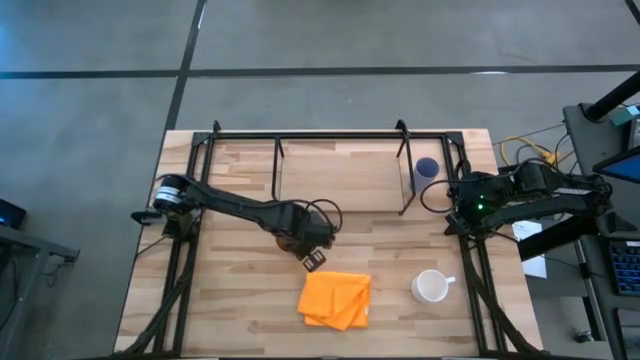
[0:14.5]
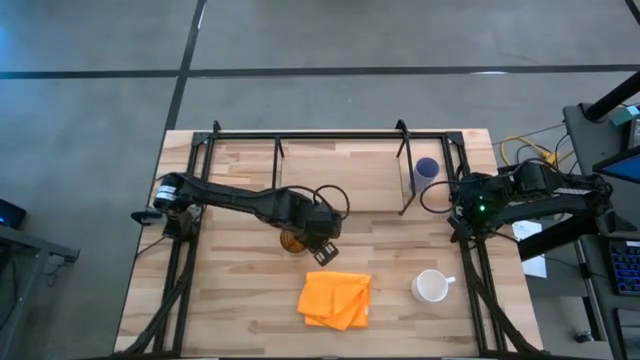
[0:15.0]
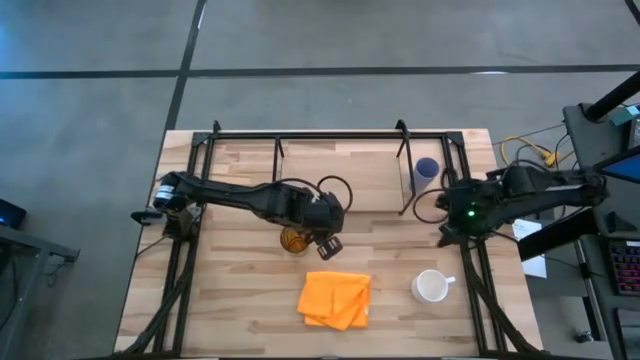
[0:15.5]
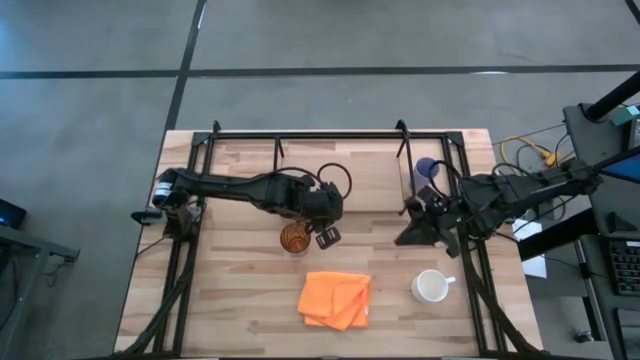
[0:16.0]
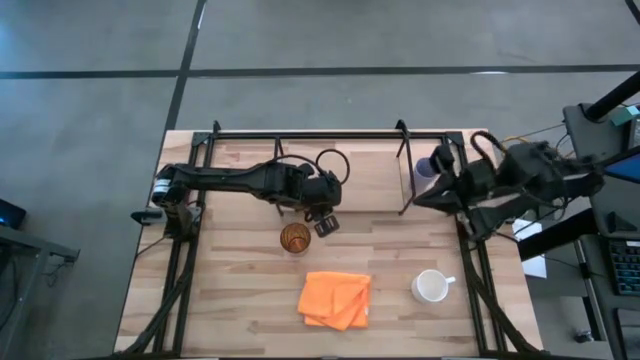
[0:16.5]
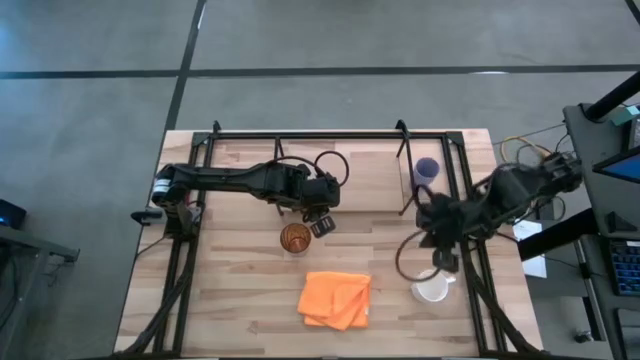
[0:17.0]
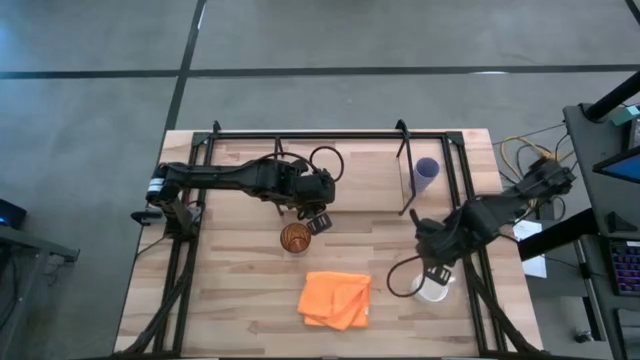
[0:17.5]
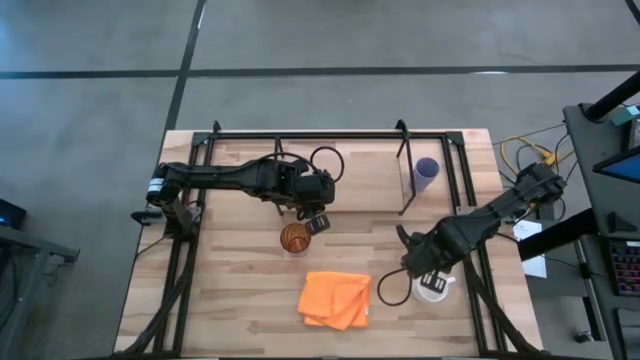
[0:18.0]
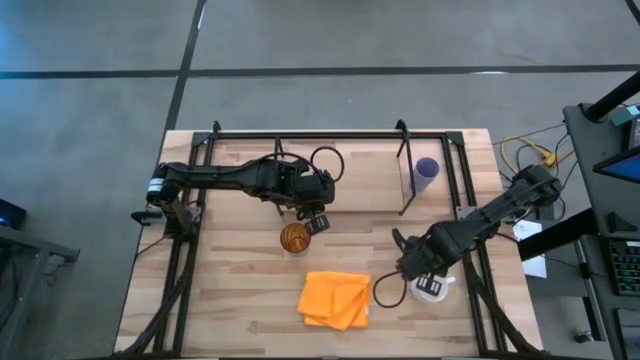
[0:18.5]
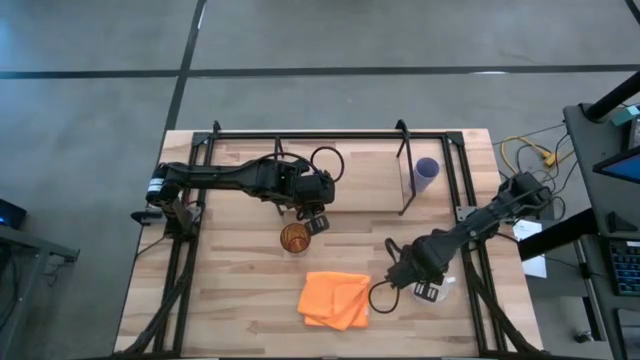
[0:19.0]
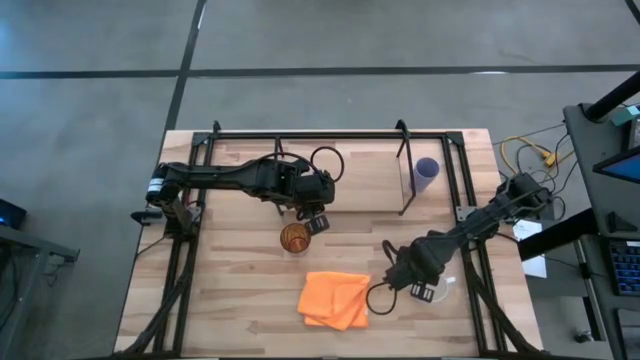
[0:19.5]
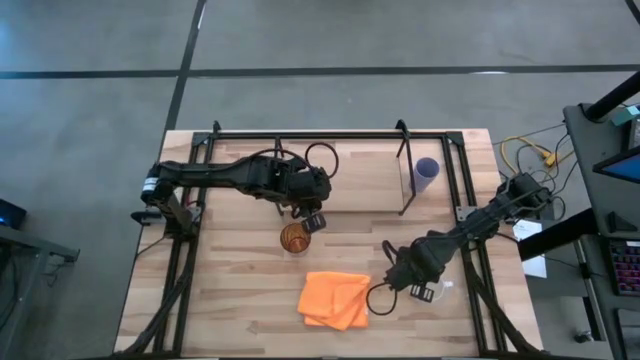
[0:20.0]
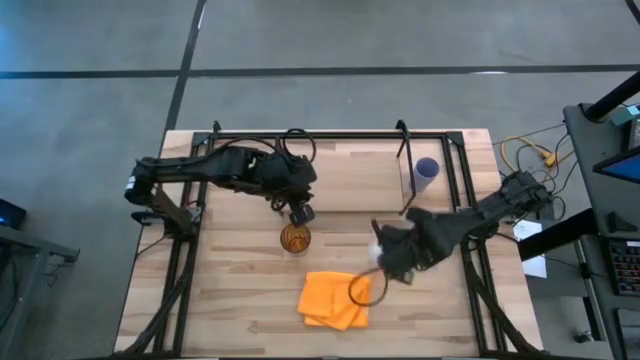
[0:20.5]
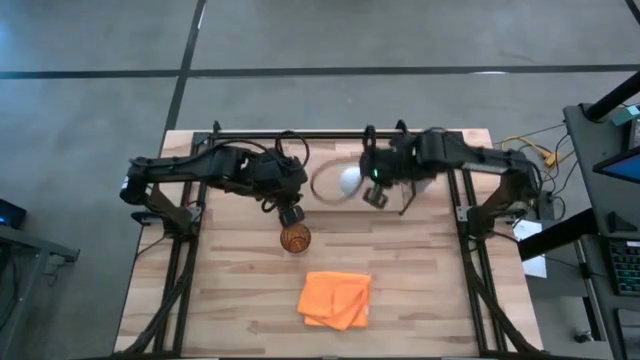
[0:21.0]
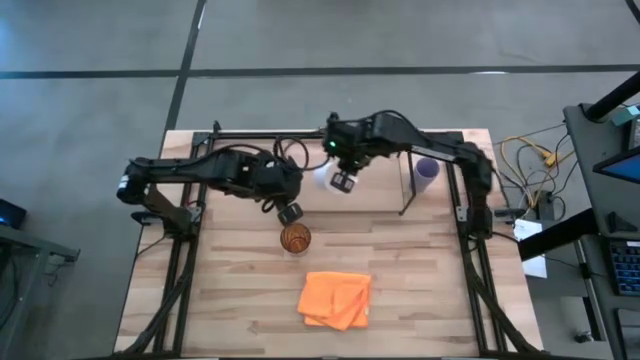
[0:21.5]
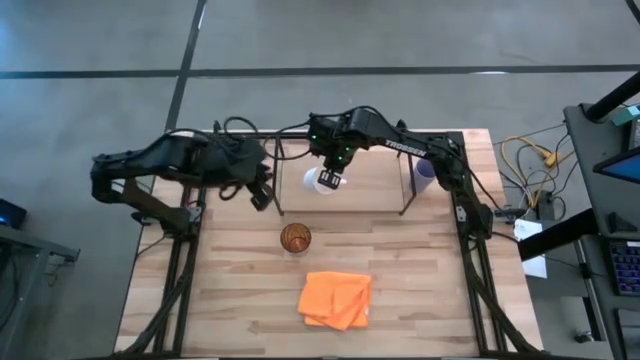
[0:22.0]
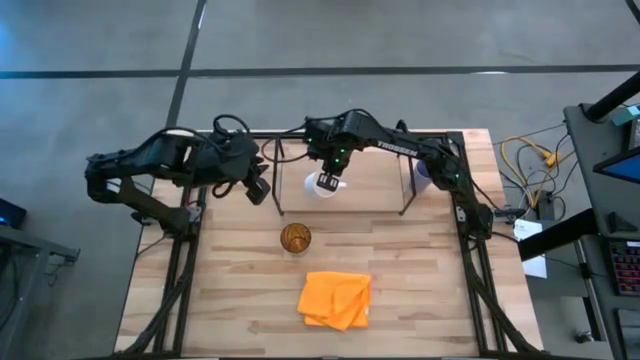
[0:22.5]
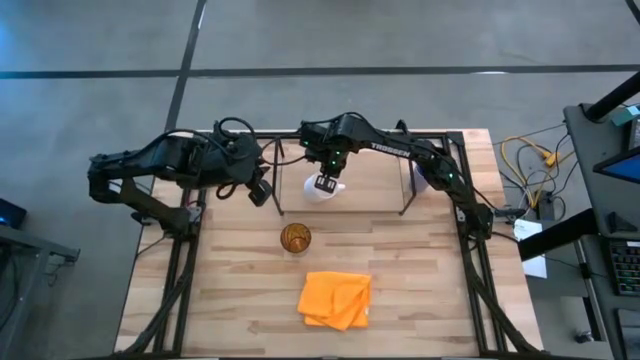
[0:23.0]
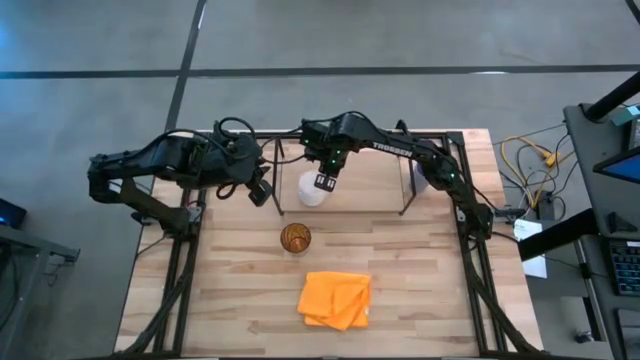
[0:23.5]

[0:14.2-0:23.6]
Task: Stack small to large cups/mugs on shelf
Put the white mug on the shelf

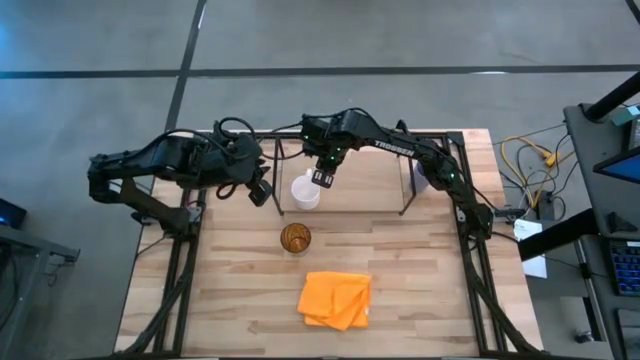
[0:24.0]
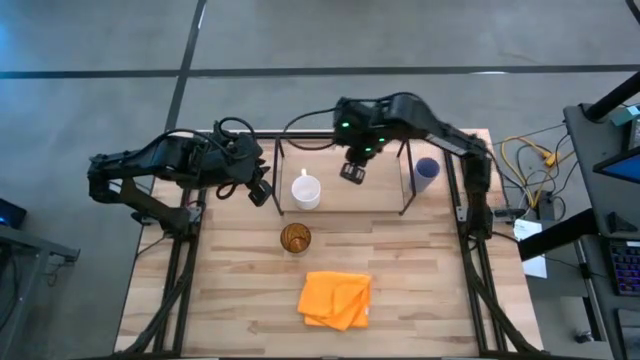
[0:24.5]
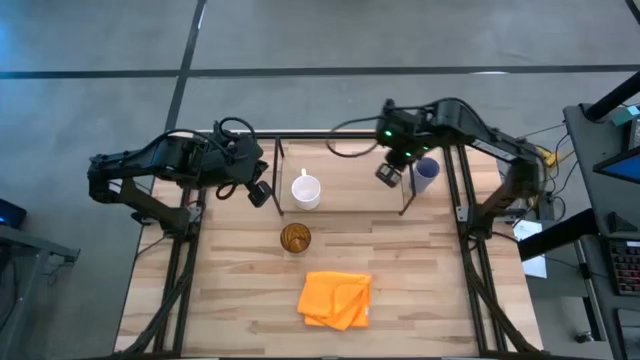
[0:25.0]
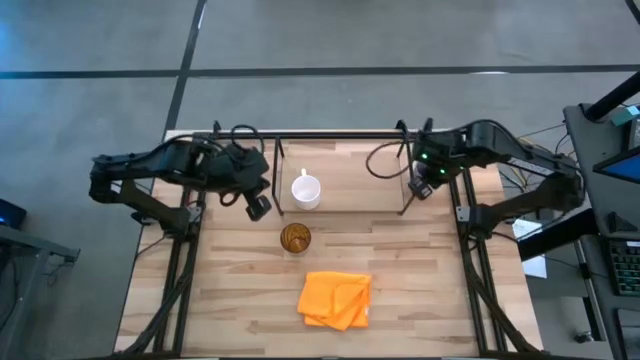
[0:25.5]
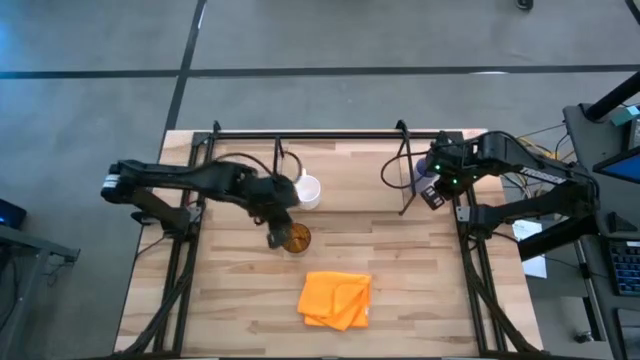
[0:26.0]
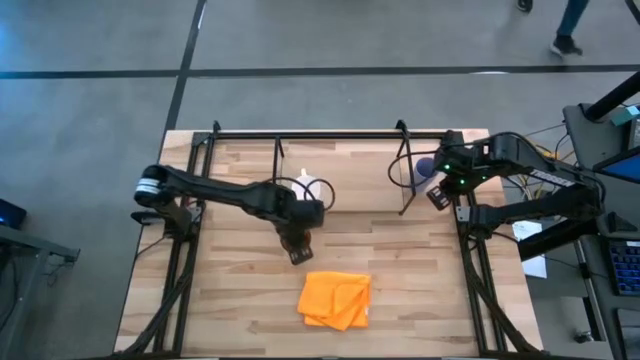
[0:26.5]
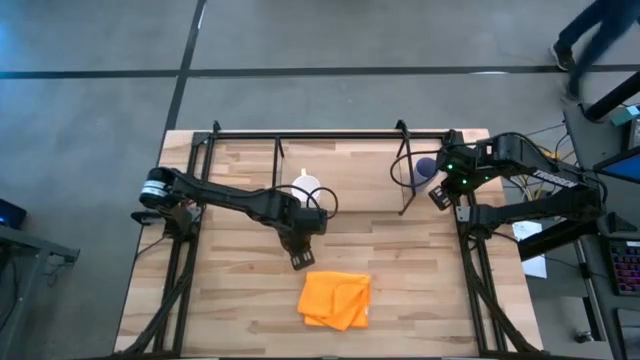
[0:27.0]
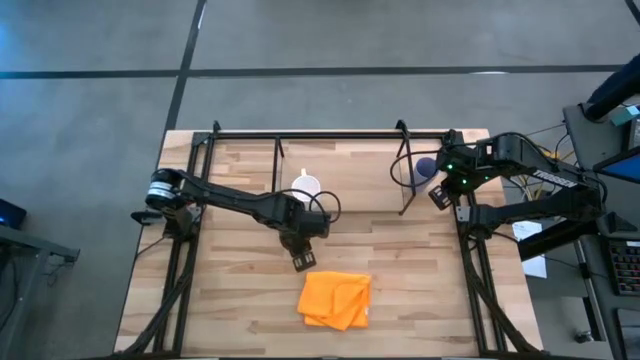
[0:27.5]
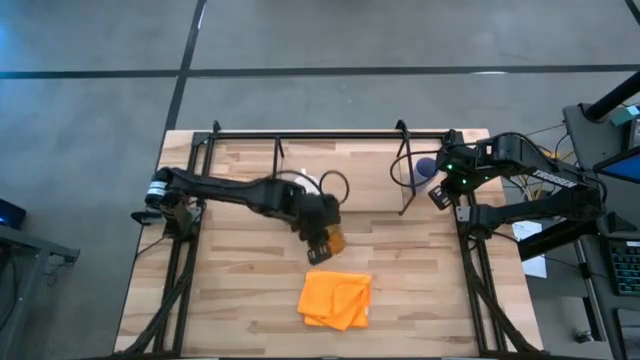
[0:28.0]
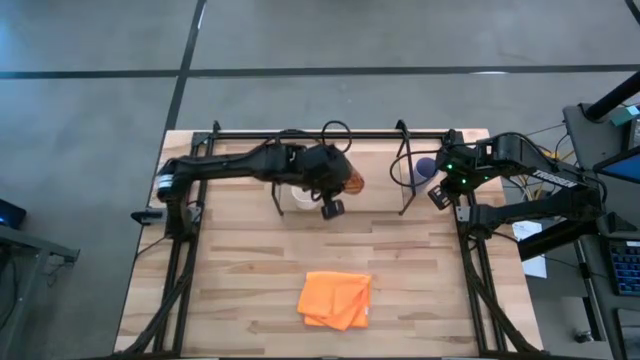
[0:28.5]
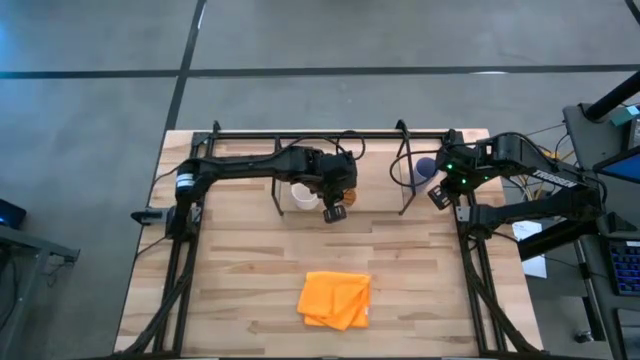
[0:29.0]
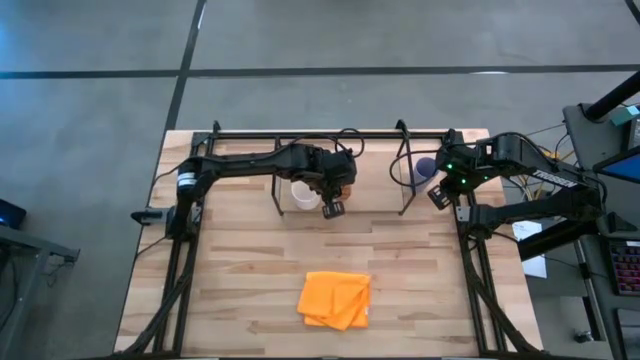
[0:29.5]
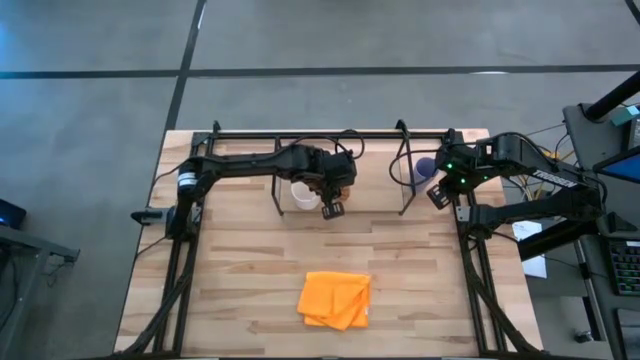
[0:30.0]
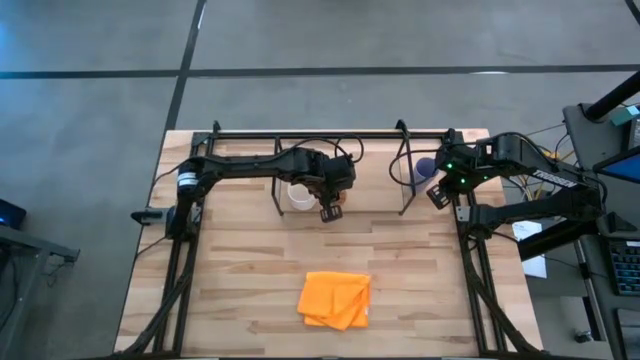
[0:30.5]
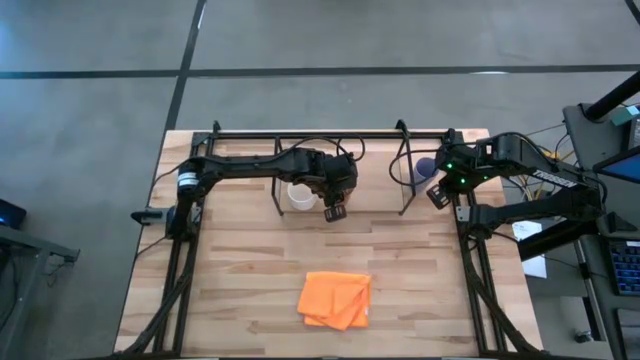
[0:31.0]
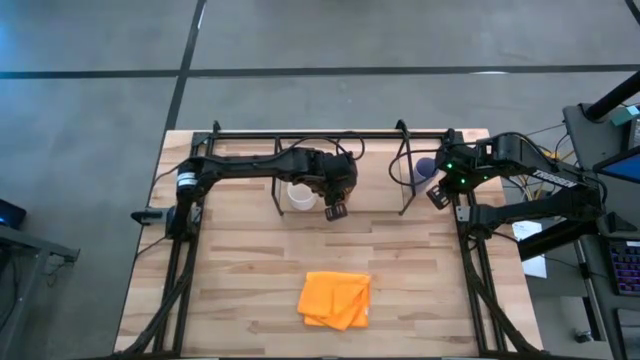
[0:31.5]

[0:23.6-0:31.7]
Put the brown cup on the shelf

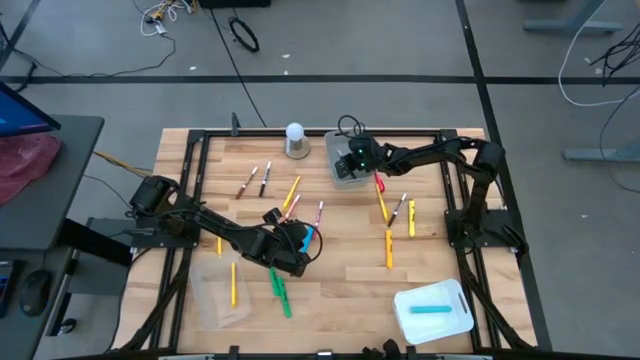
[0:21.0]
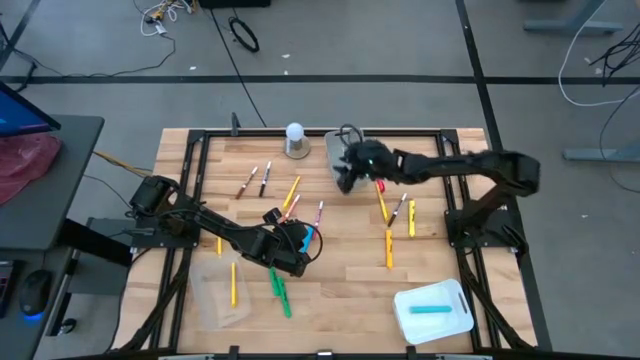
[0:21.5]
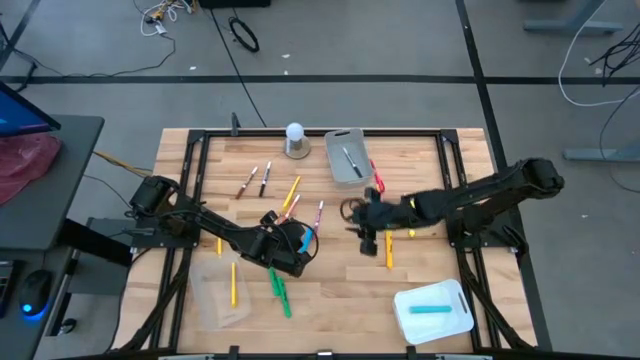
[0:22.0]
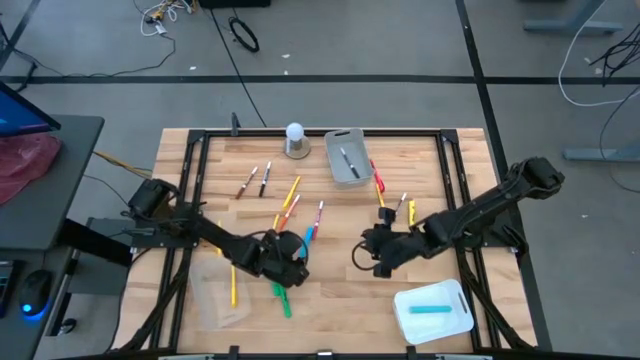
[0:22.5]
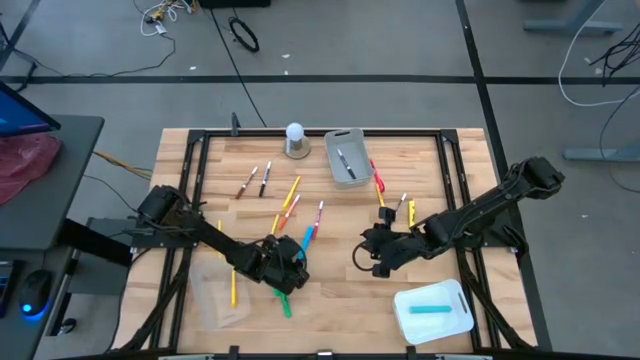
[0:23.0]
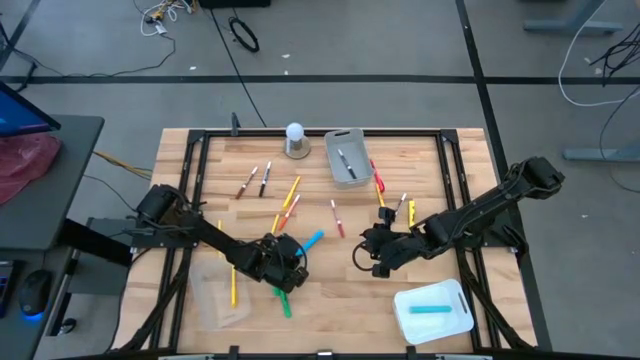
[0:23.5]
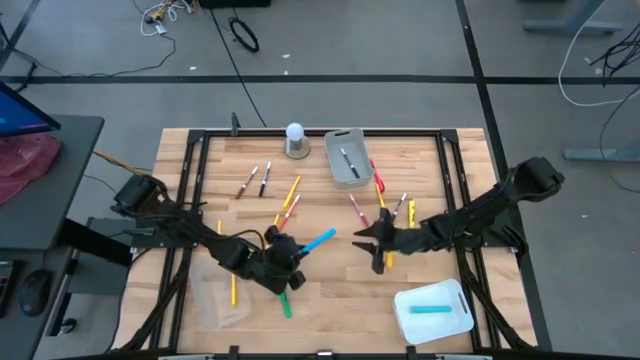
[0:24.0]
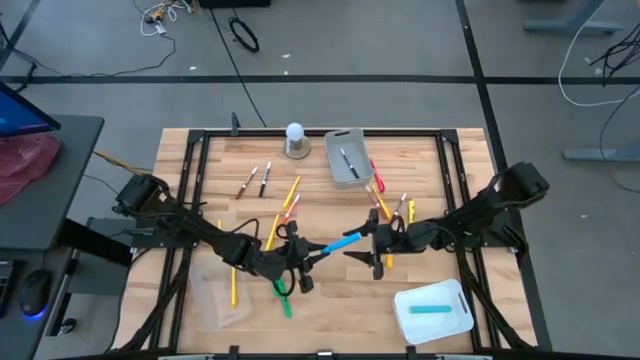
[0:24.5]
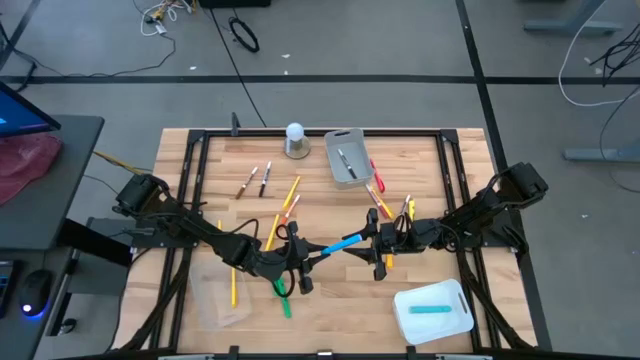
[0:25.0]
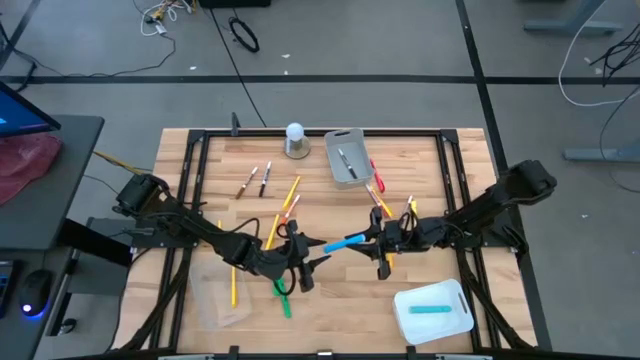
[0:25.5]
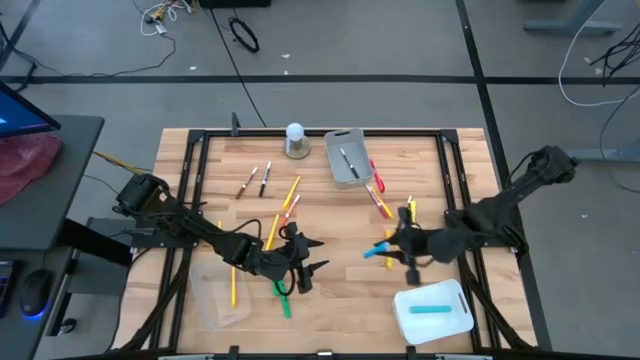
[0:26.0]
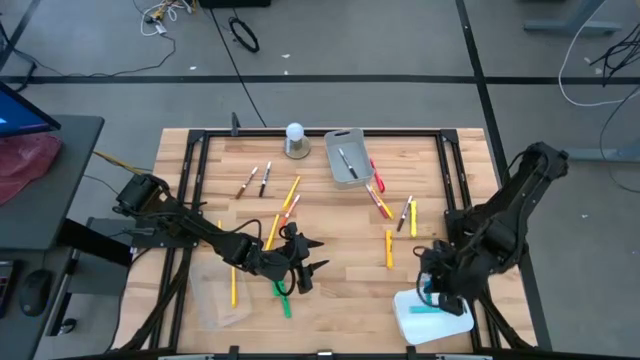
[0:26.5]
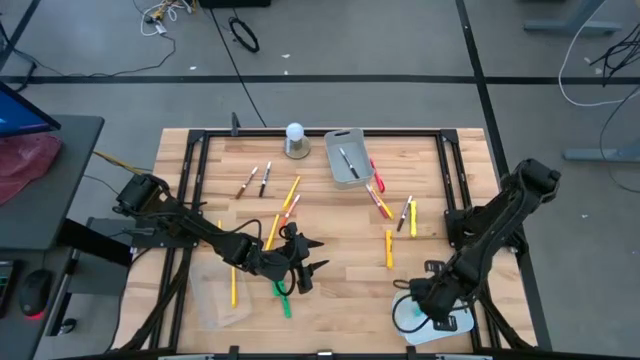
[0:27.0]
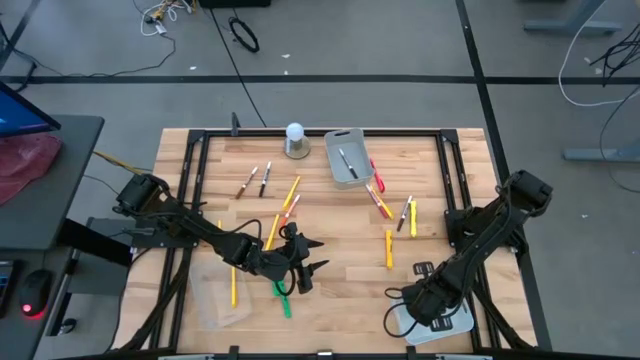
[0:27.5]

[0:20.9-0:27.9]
Task: Pick & Place Markers
Put the blue highlighter pen into the white bin
